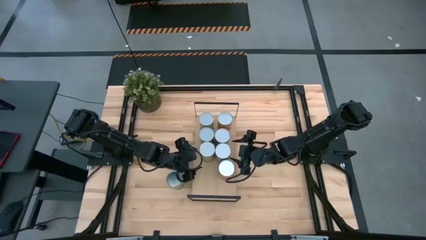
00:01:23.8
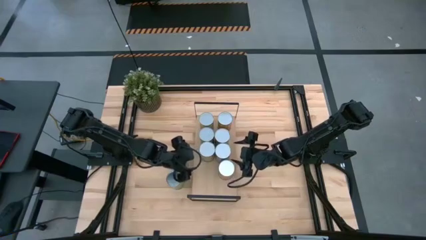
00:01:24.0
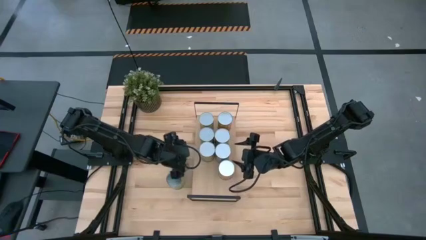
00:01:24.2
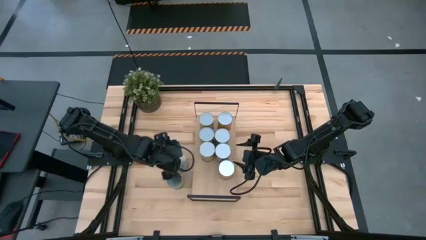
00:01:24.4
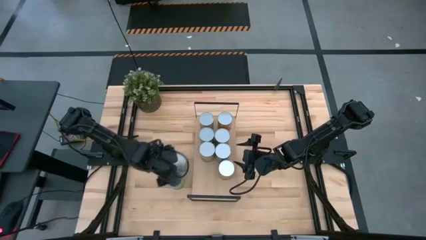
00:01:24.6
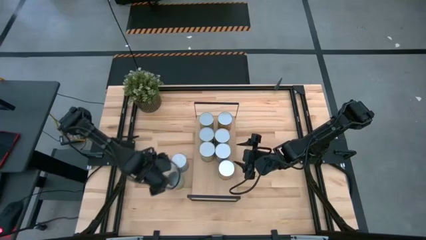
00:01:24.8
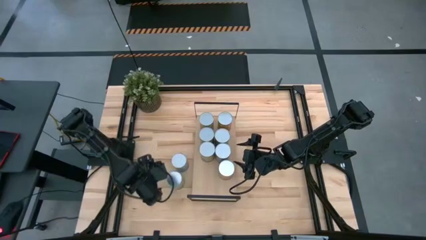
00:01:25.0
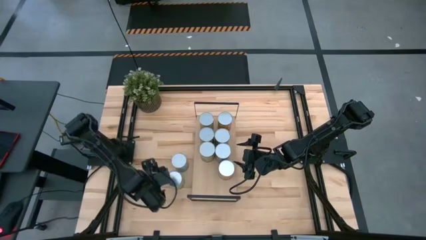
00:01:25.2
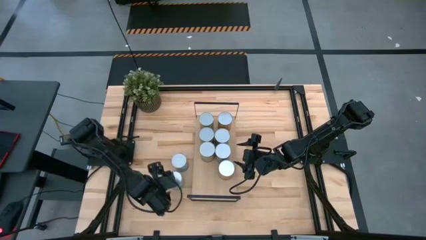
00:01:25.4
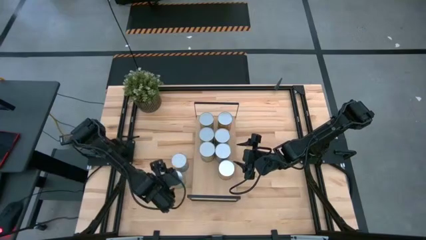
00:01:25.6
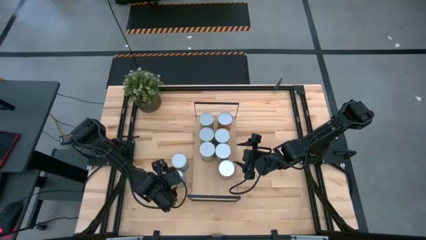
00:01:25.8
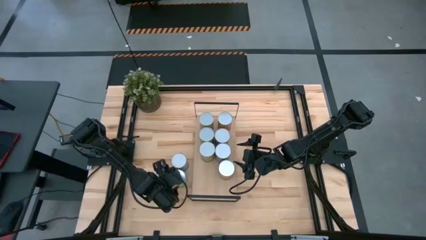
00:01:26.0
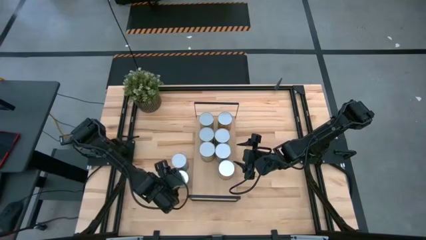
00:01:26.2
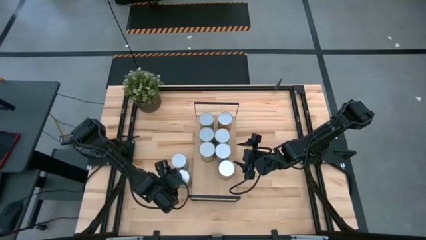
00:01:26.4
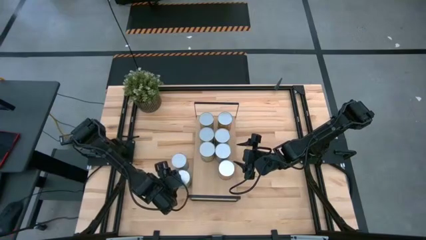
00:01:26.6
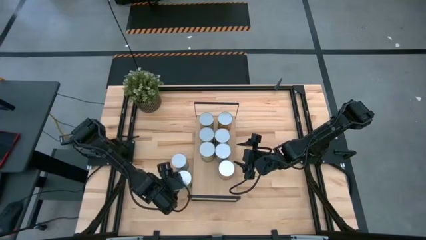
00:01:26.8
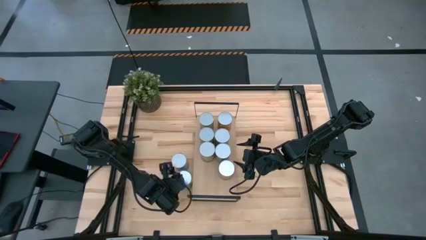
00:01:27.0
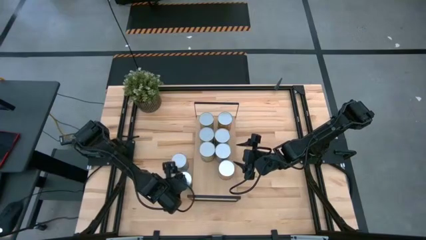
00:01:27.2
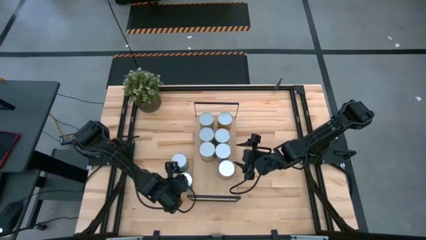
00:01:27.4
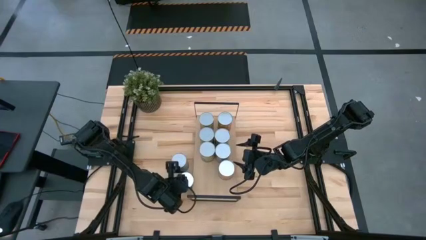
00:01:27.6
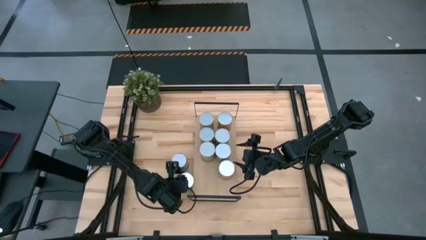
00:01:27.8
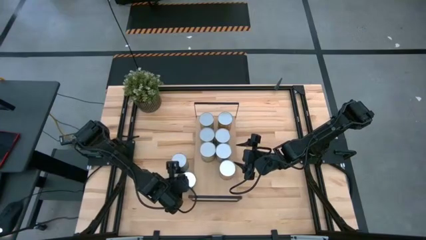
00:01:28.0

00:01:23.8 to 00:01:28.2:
Task: Pick and place cans onto a shelf
Put the canned pears on the shelf

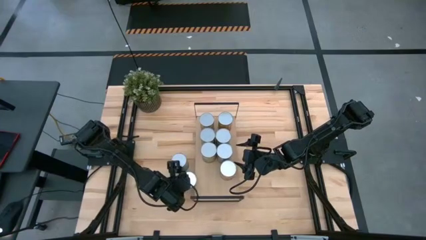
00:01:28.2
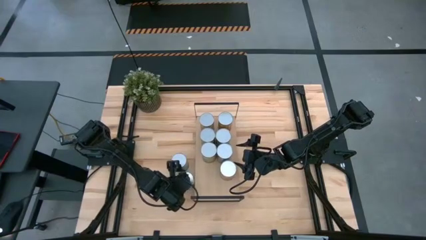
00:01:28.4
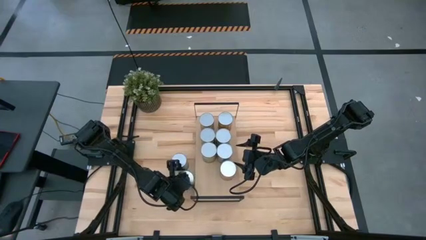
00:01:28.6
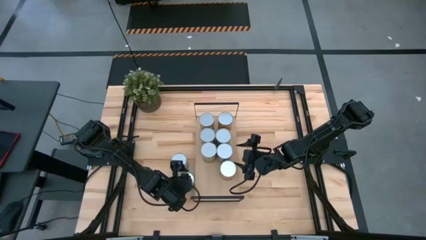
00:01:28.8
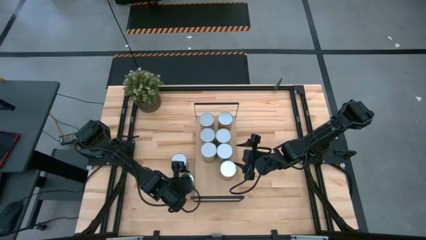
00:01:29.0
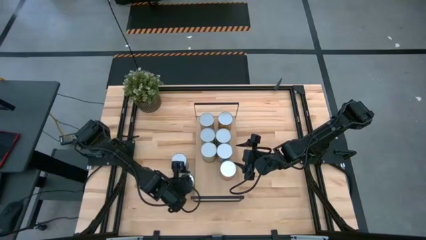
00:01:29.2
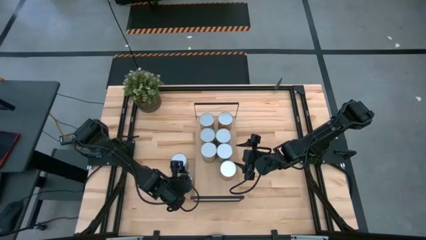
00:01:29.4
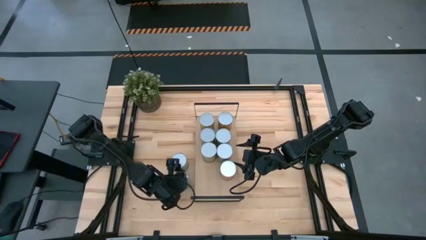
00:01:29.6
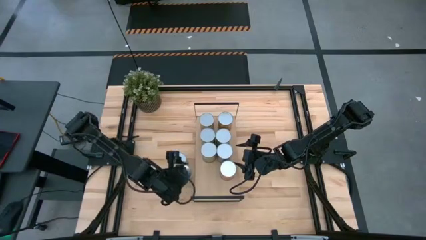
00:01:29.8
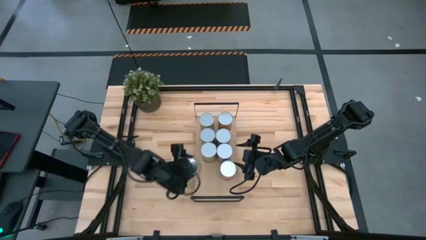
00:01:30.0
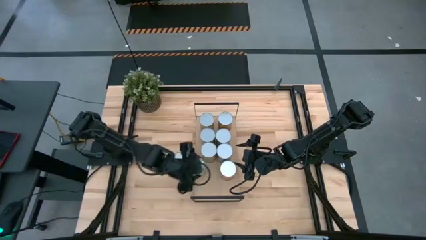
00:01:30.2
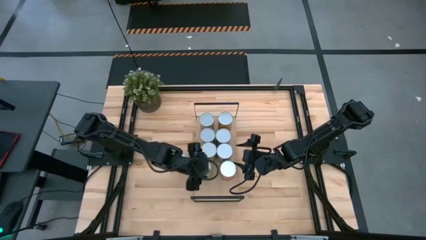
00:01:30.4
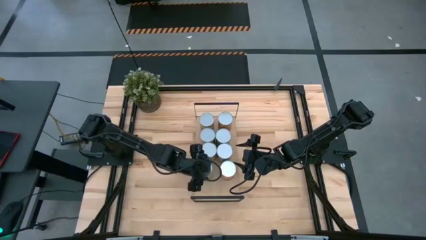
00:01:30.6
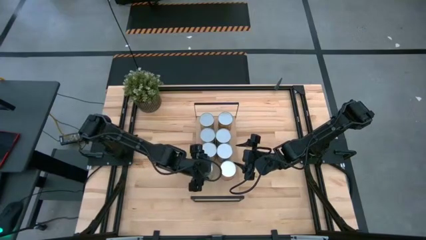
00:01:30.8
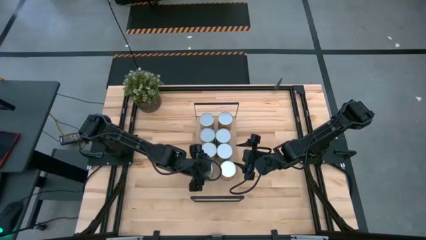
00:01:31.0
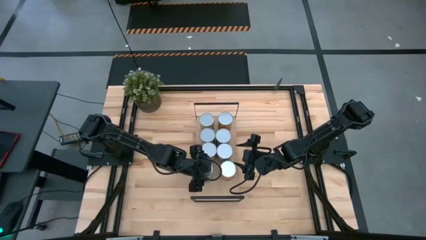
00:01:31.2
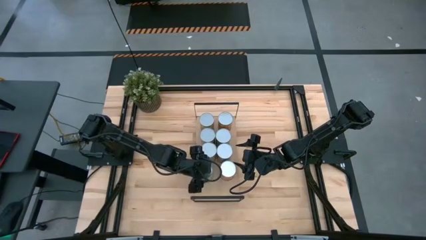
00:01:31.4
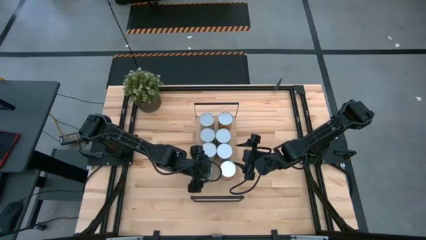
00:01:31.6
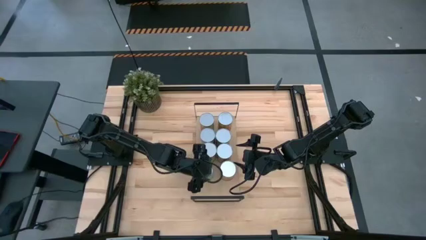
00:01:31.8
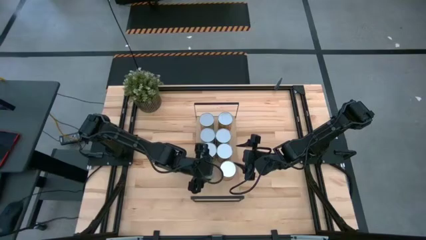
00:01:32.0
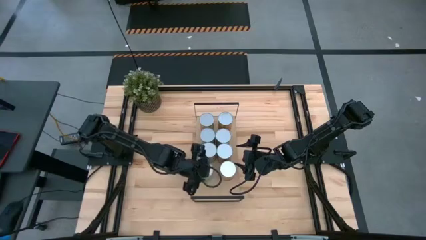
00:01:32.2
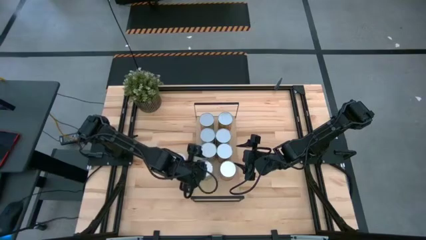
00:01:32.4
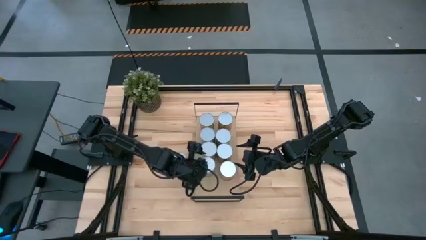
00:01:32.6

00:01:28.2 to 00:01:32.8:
Put the canned pears on the shelf

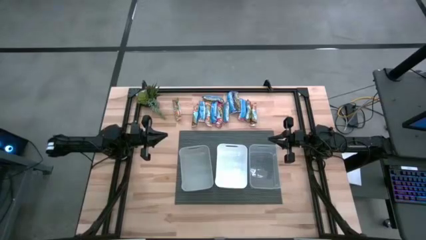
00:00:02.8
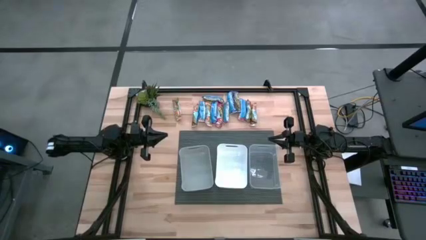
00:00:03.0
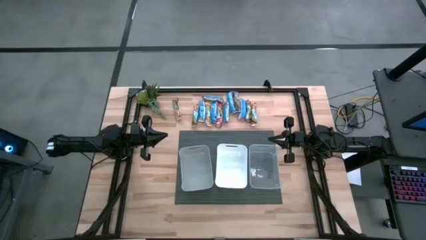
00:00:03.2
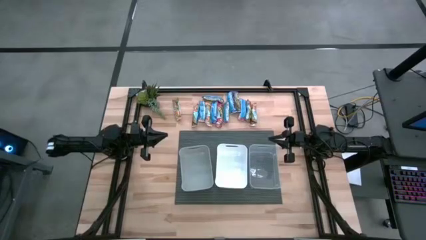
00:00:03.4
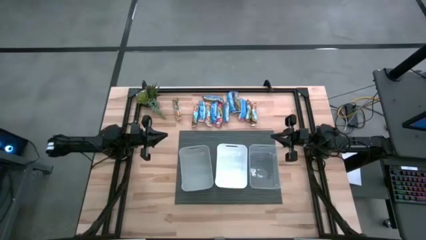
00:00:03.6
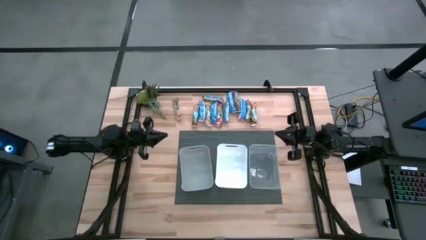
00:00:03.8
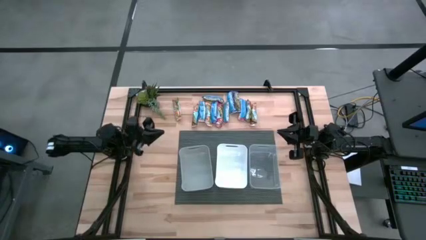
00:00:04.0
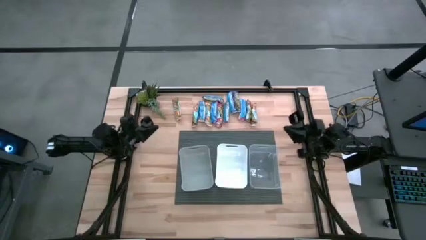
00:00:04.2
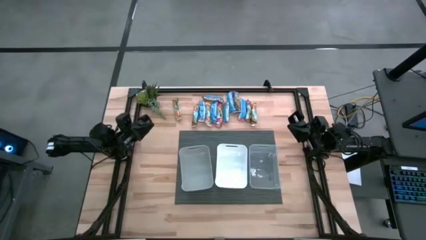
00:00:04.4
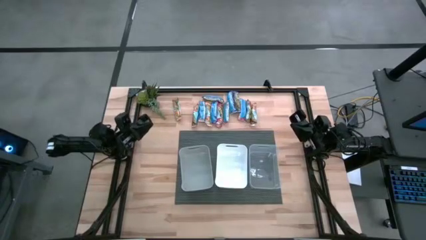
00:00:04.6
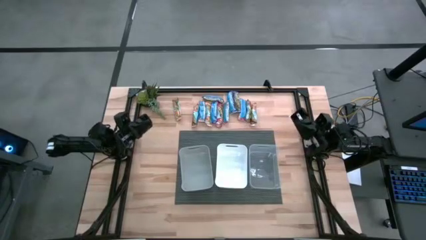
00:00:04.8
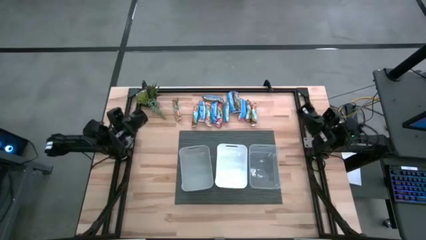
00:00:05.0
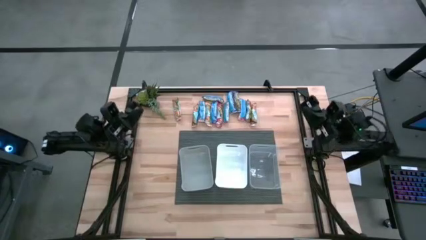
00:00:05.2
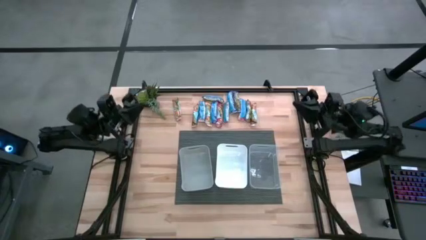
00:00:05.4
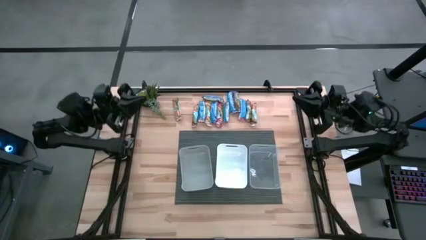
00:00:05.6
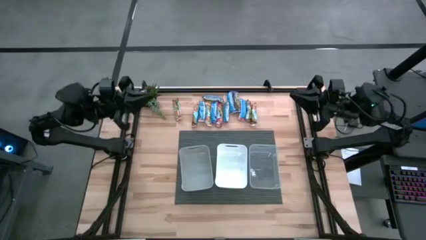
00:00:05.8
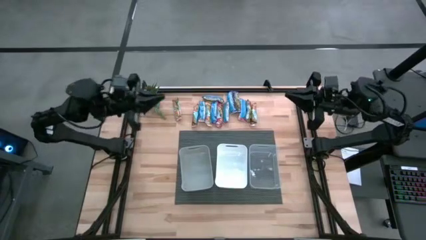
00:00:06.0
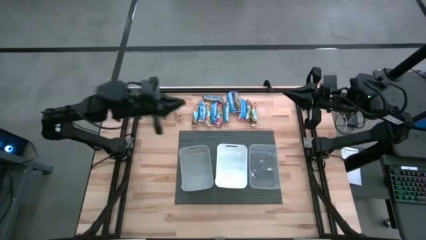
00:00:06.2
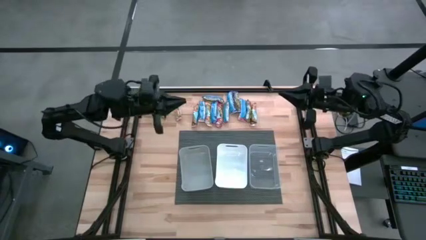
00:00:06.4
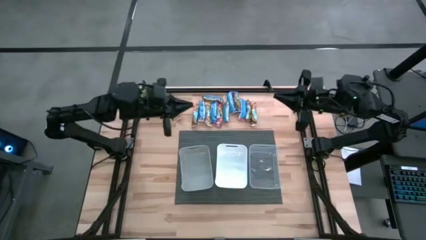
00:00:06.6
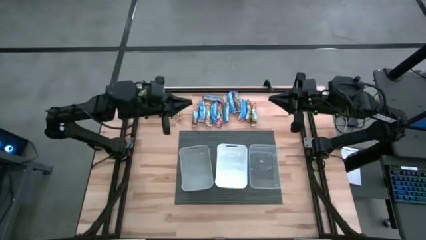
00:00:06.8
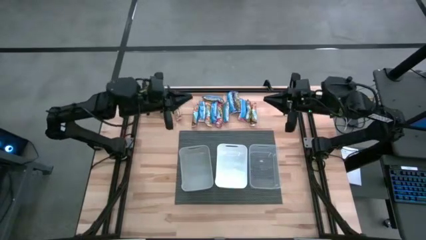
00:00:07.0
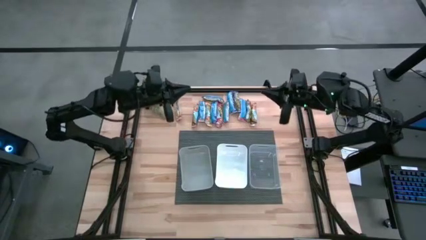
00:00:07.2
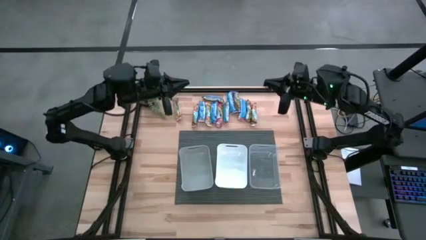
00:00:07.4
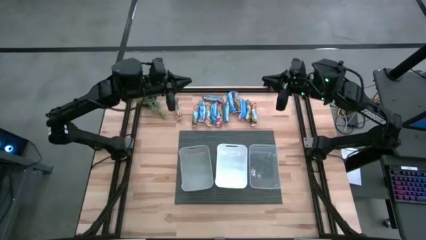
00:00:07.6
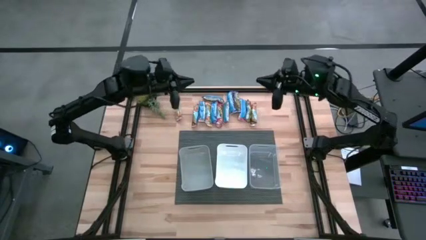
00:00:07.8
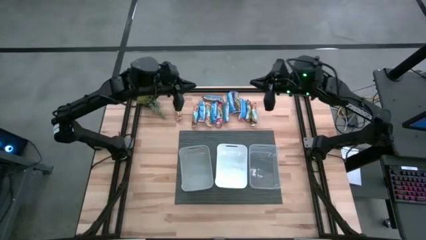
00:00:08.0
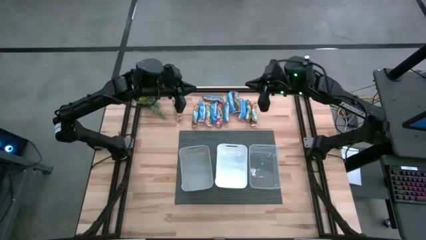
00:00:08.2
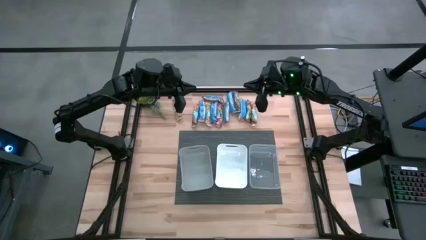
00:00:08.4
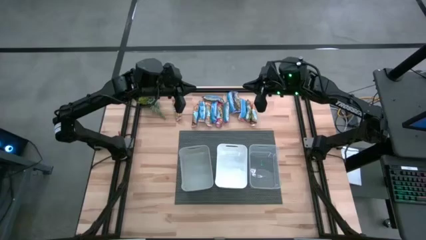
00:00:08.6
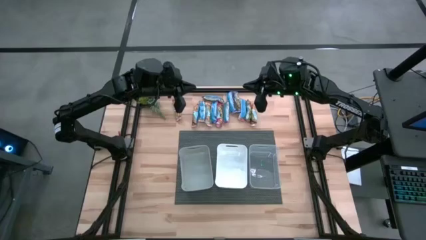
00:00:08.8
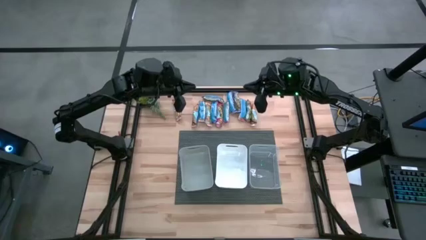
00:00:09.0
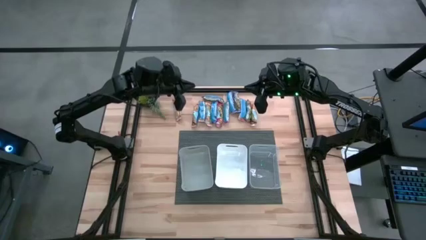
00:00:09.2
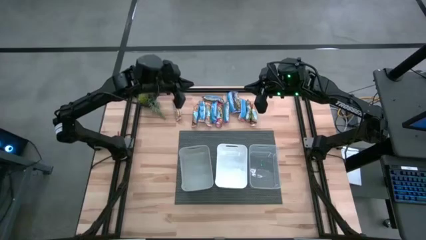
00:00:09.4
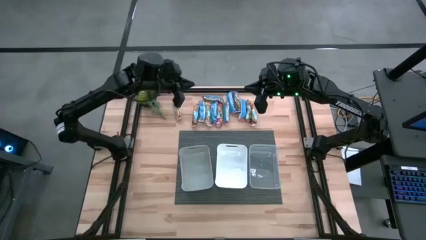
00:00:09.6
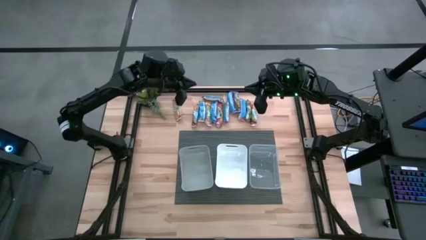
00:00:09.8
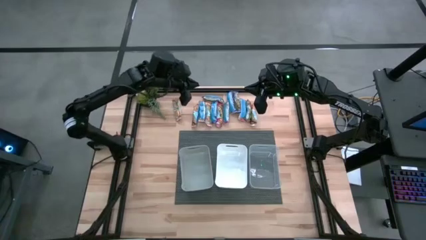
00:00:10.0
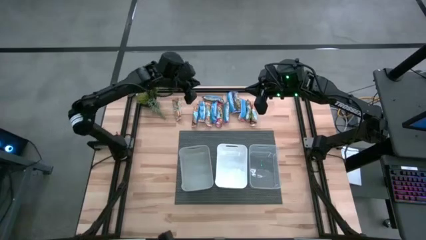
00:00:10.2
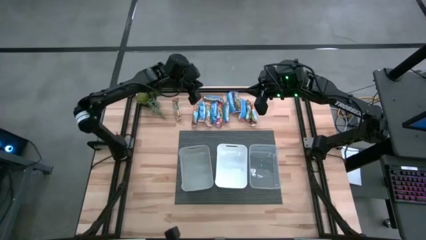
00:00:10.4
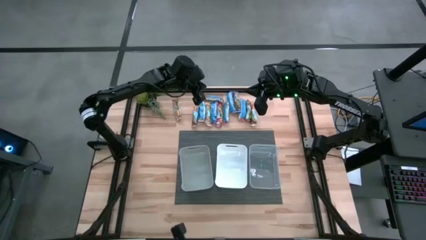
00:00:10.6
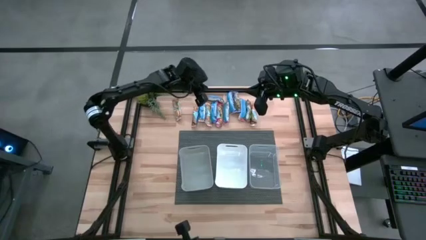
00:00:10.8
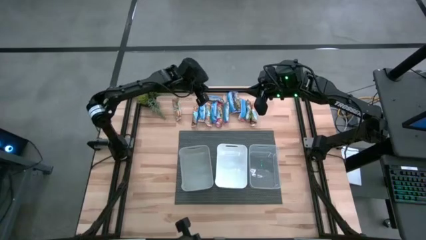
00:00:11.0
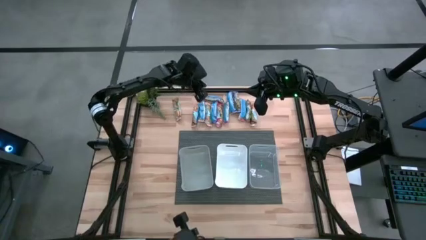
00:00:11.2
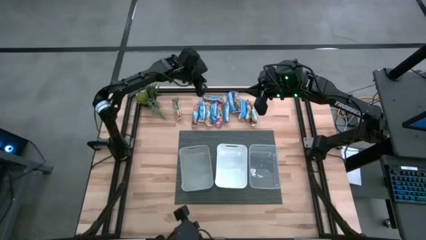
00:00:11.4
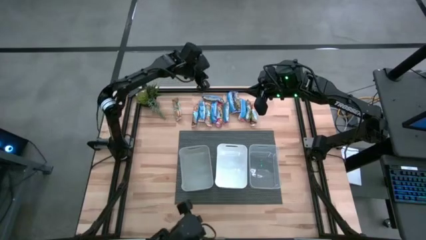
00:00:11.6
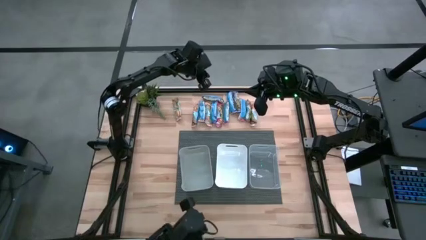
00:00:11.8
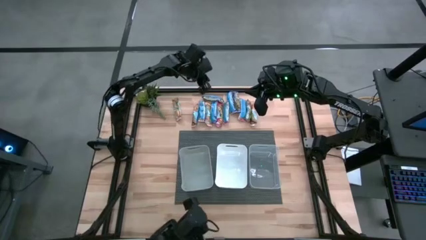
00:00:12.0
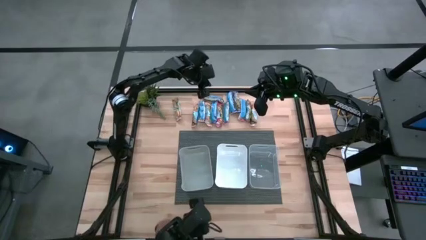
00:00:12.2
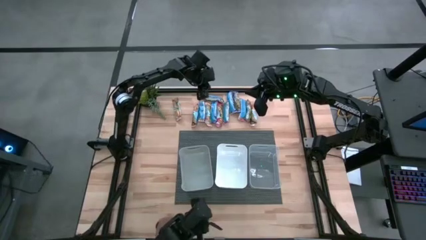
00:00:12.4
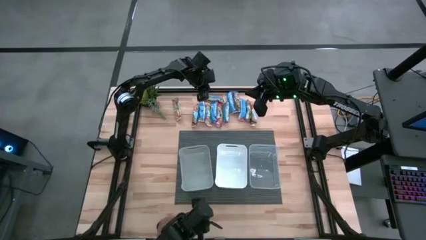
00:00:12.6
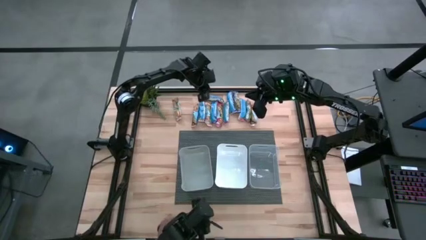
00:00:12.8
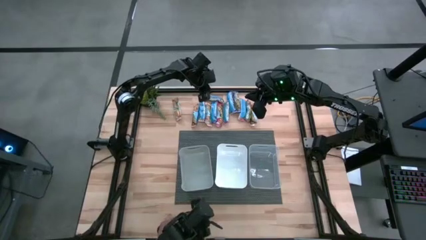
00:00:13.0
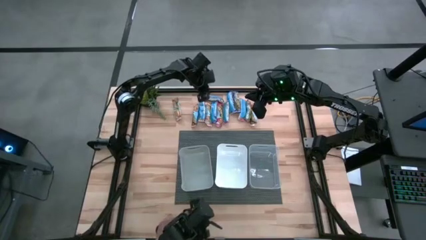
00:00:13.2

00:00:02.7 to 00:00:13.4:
Task: Pick and place Granola Bars by type
Put the red granola bar into the gray bin
